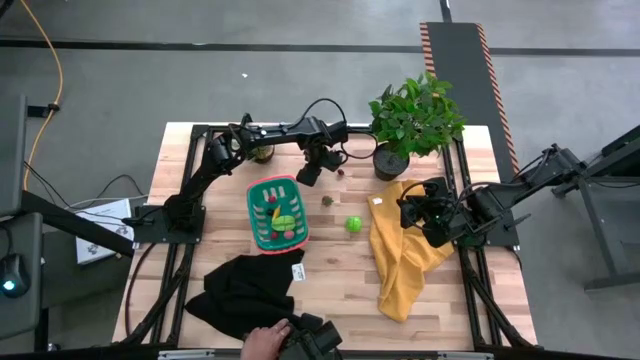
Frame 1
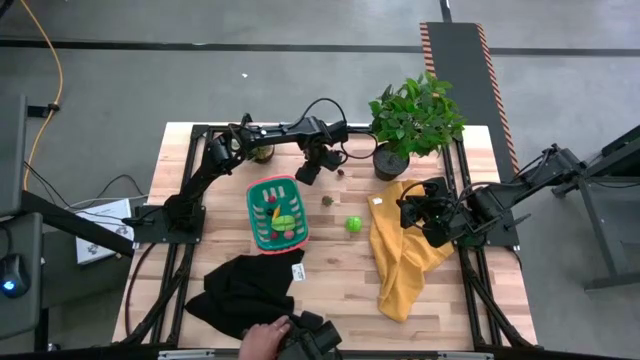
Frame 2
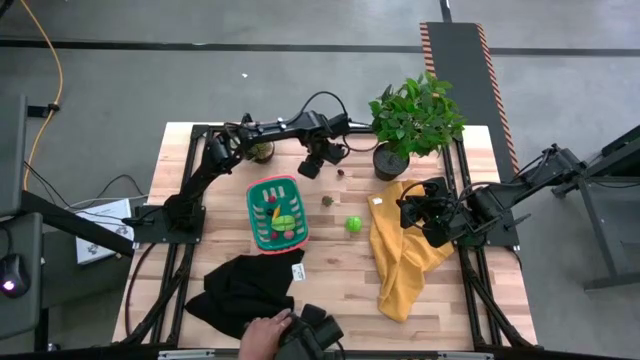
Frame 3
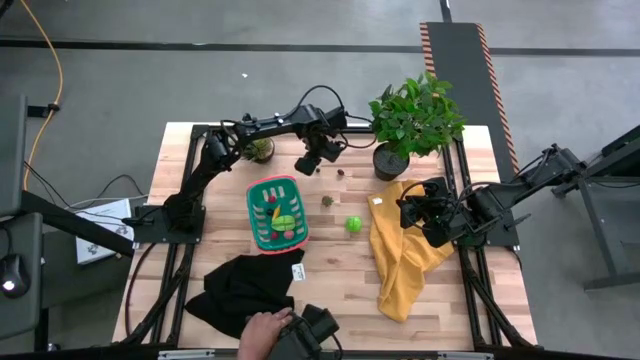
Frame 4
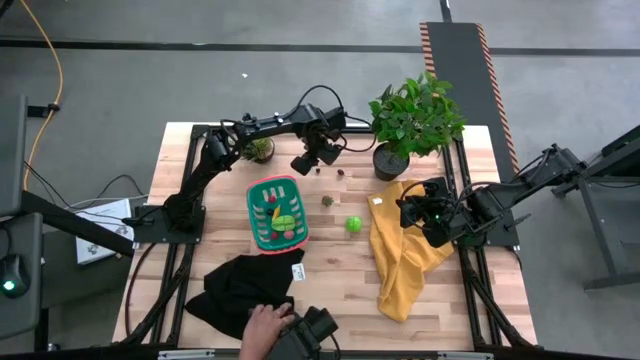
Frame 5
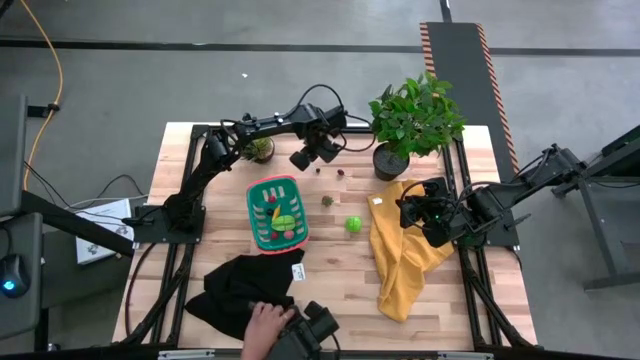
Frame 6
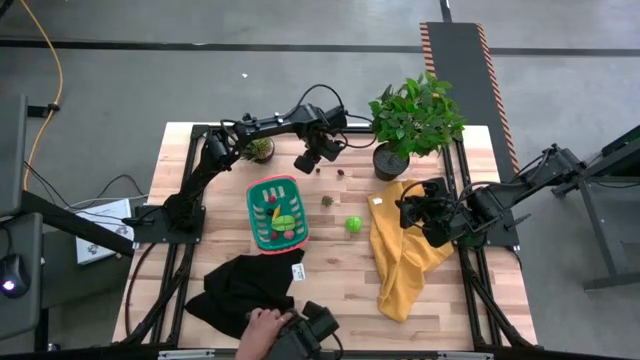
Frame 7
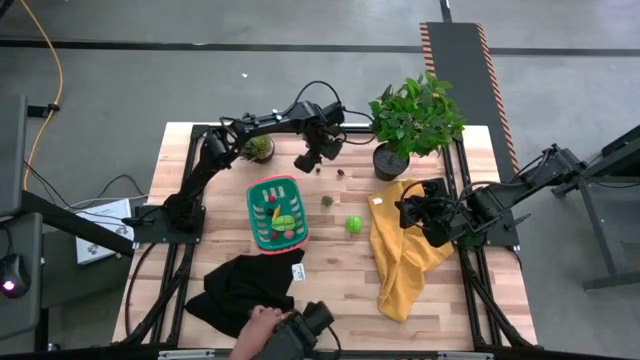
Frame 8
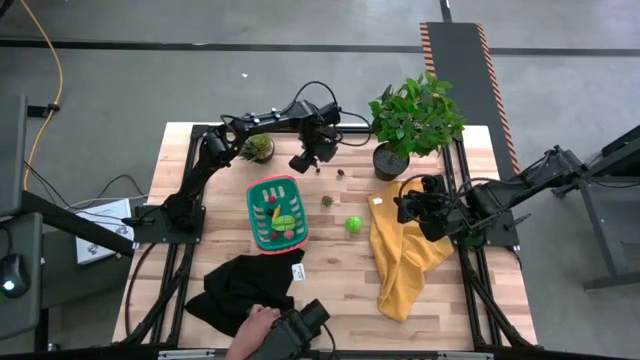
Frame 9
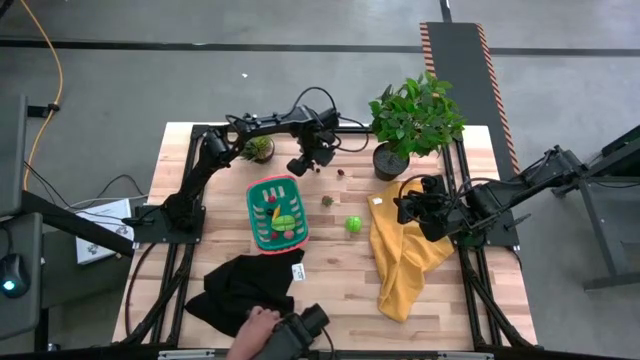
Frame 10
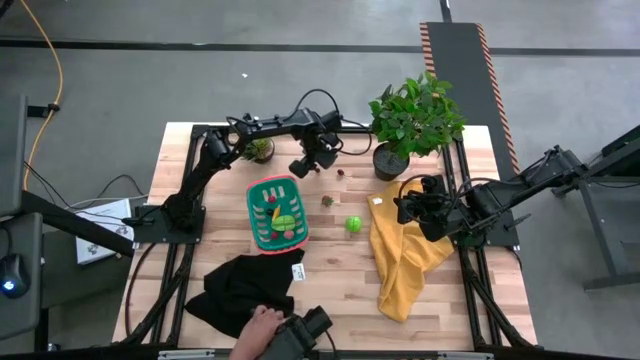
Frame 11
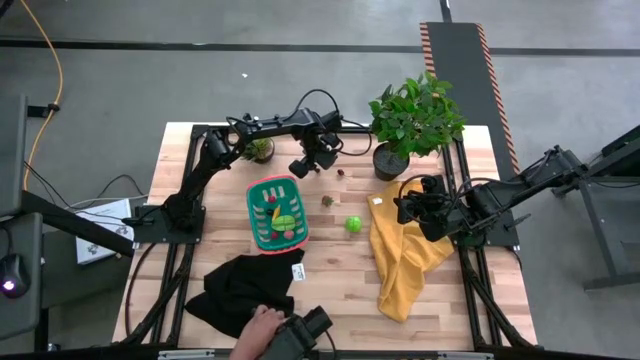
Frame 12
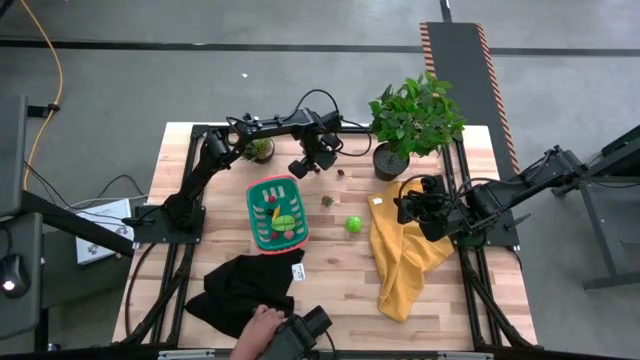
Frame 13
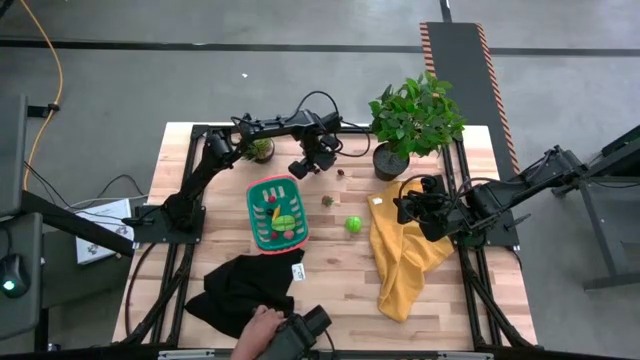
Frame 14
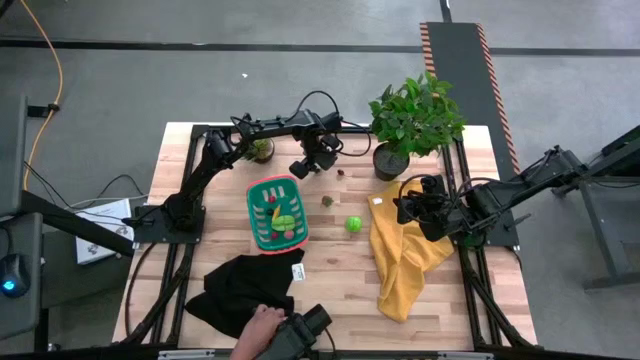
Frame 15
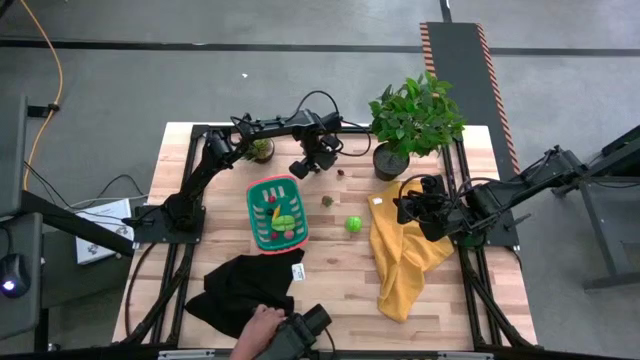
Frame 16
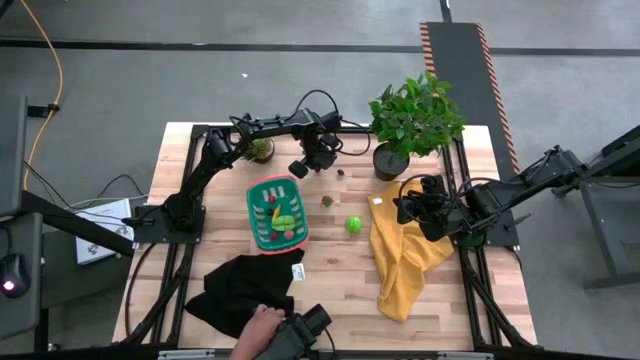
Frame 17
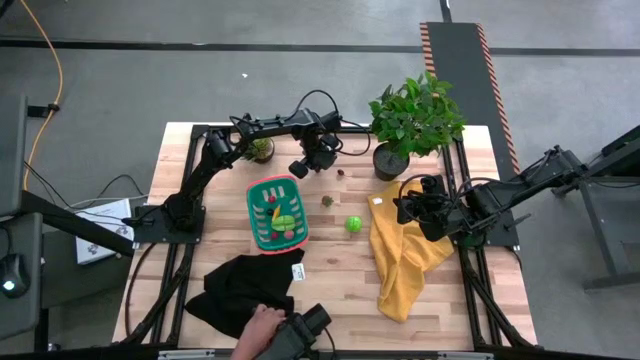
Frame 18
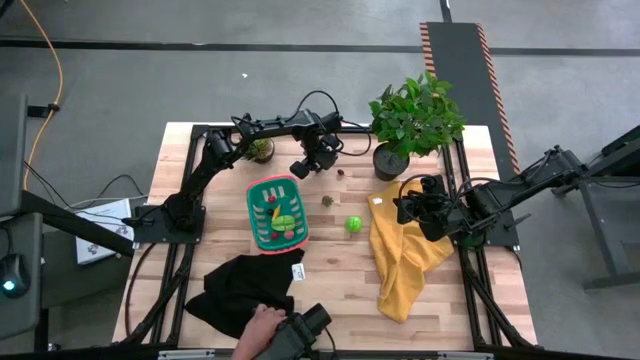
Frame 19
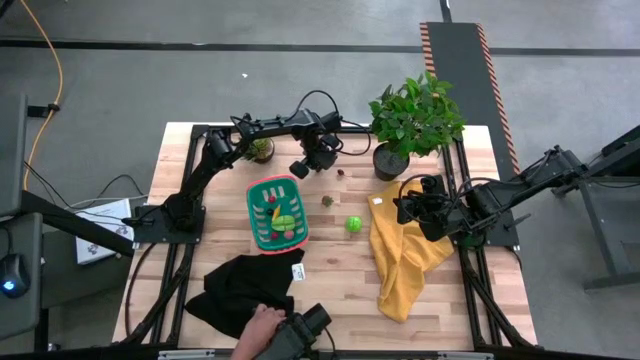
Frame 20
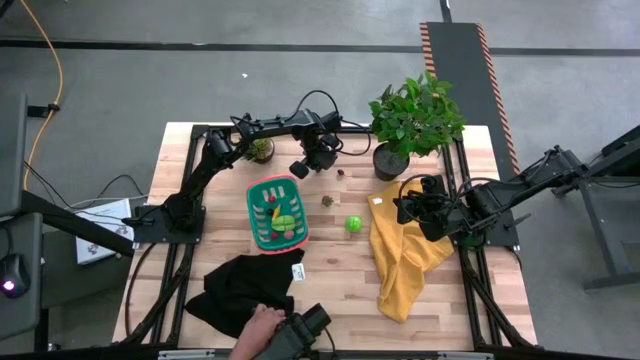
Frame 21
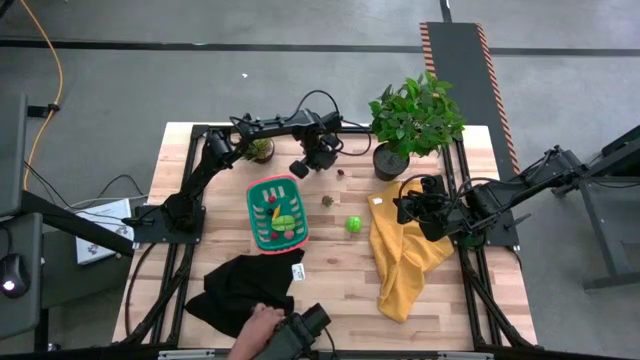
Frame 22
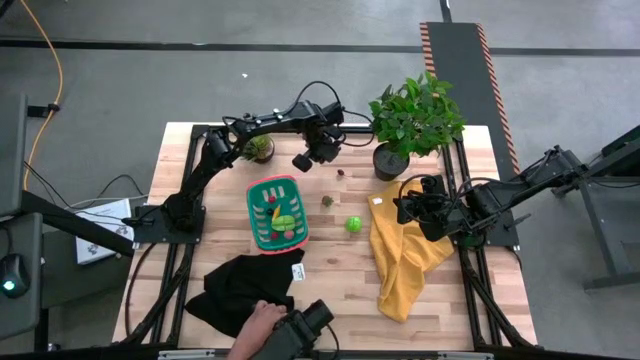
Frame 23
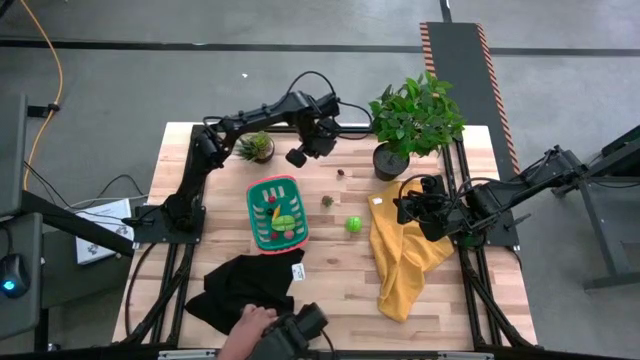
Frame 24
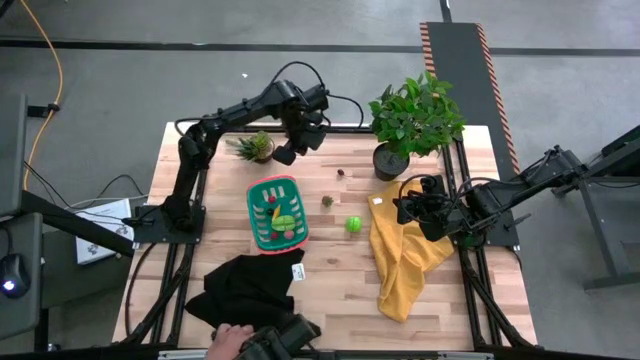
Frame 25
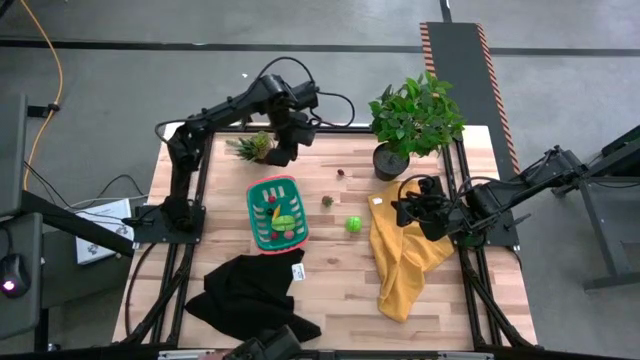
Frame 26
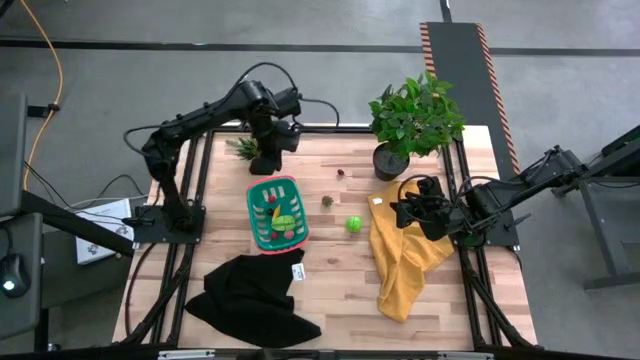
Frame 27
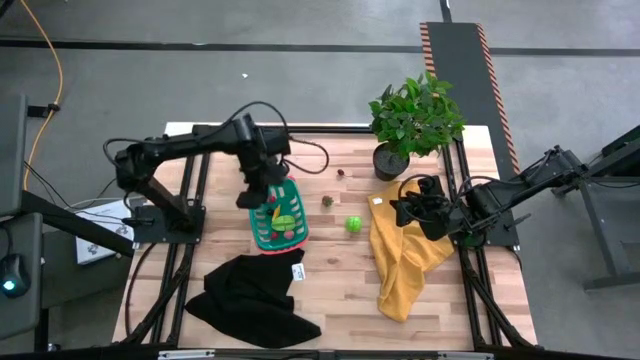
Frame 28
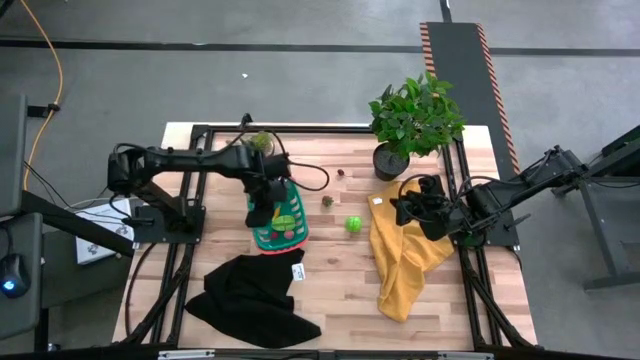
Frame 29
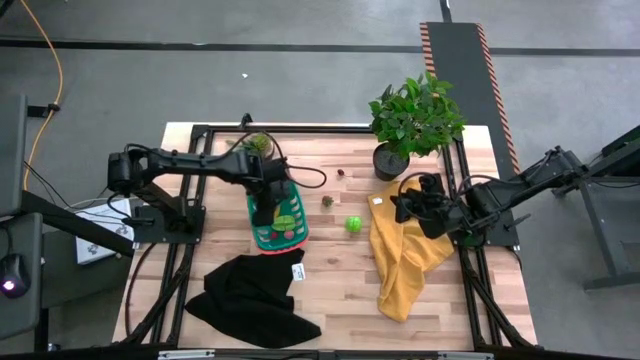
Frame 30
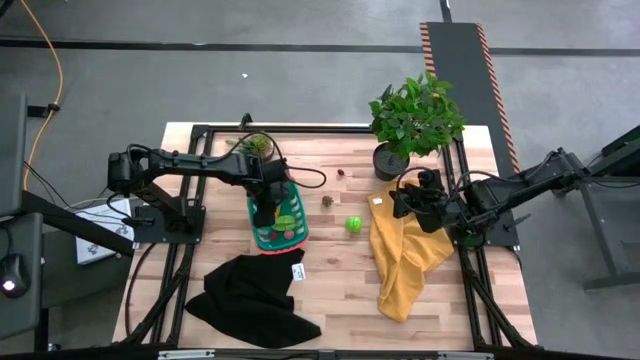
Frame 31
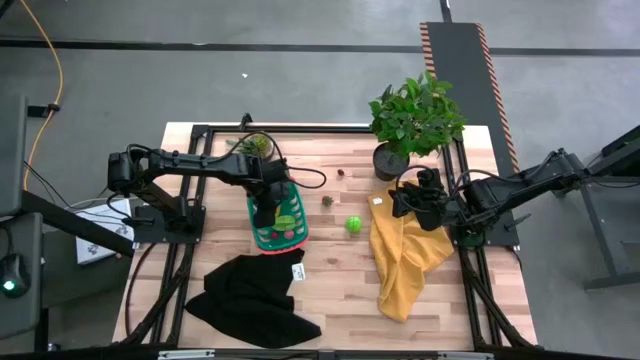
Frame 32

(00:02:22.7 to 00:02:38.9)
Task: Pick and placing Produce into tupperware
Put the blueberry in the green basket

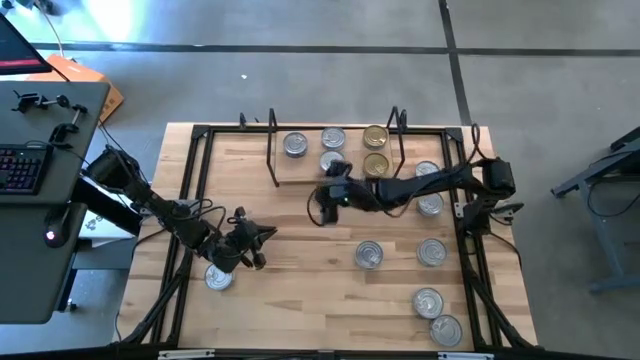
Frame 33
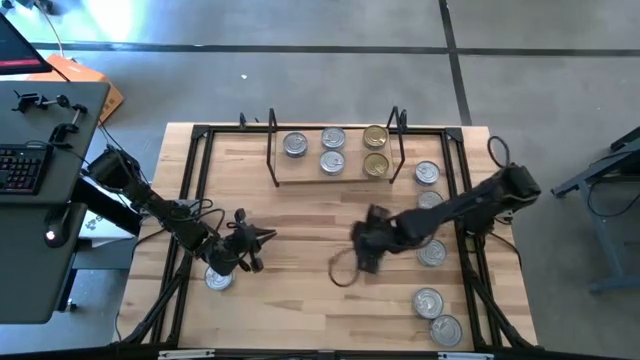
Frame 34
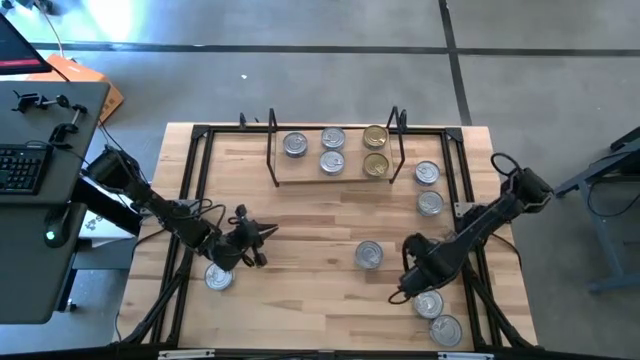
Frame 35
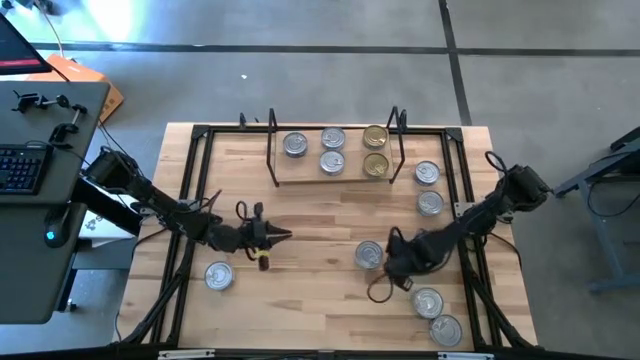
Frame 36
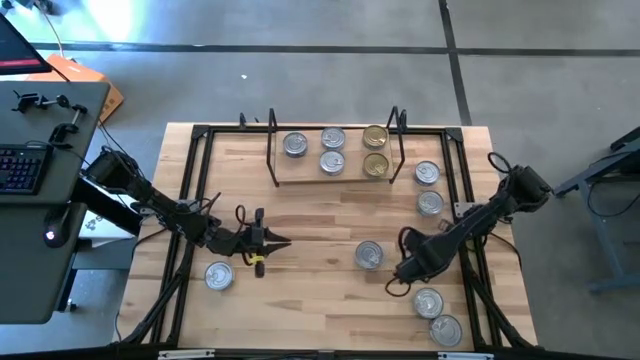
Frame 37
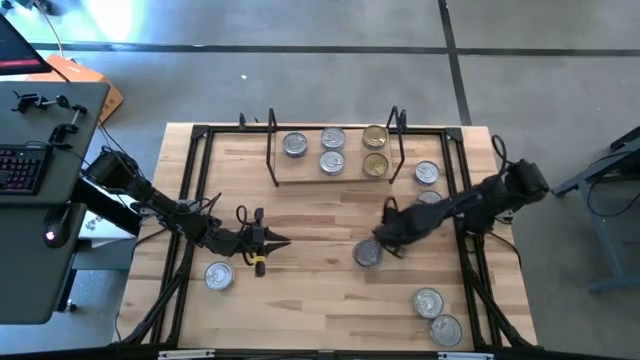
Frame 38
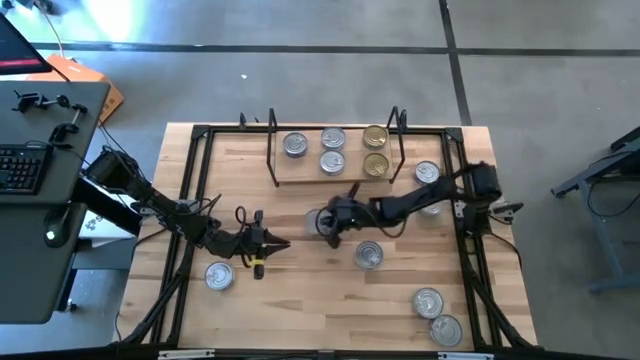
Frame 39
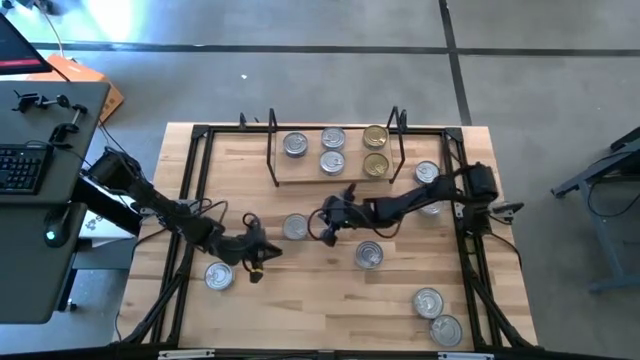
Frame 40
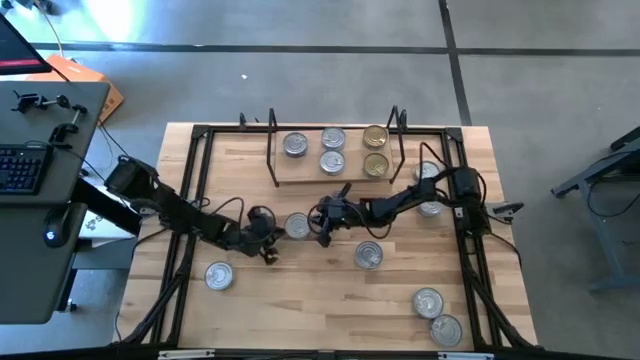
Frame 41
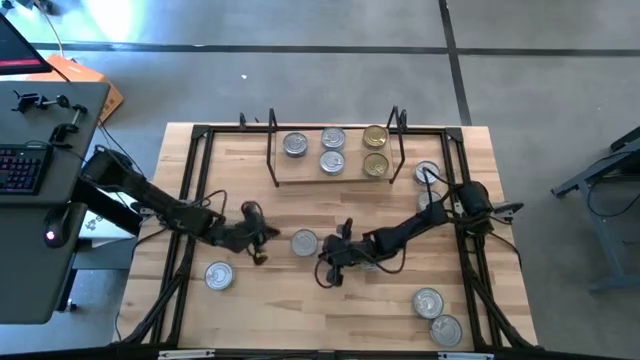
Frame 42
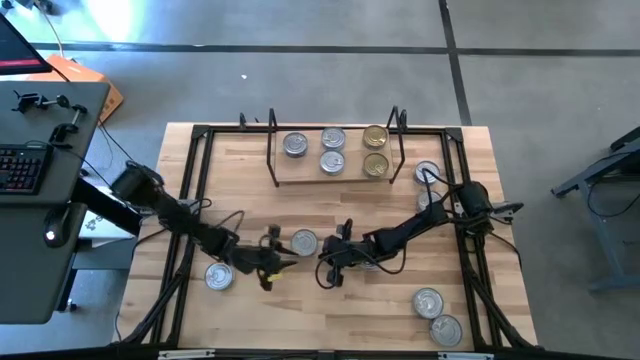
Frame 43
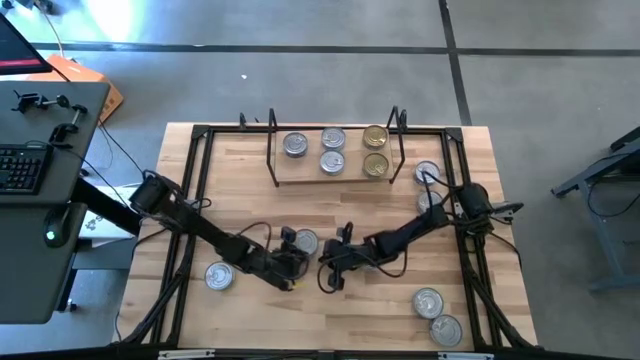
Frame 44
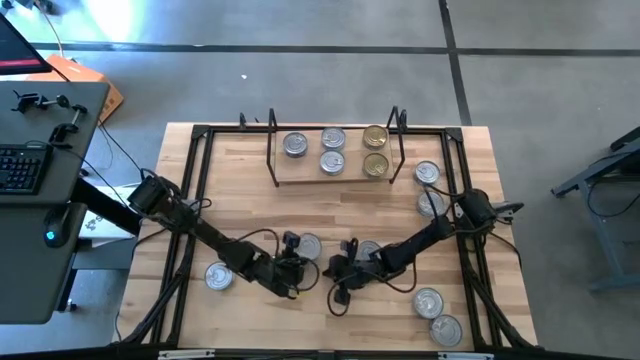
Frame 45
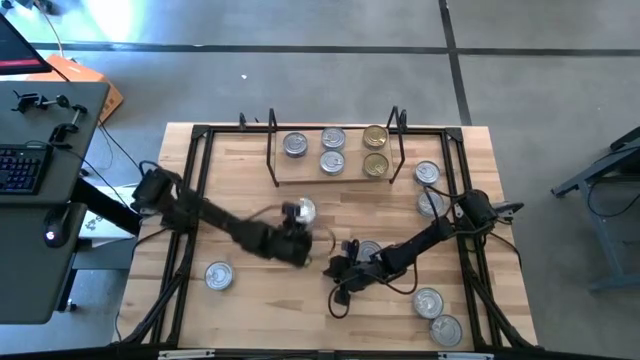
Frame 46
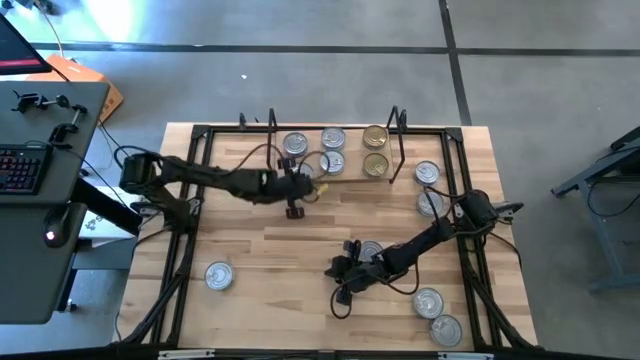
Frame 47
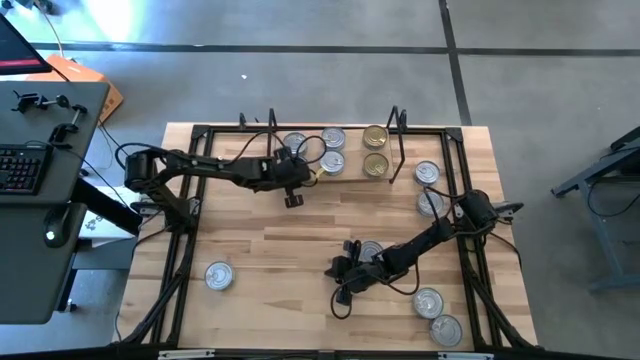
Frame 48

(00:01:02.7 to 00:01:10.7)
Task: Stack canned seafood by type on shelf
Put the blue tuna can on the shelf and align it with the other blue tuna can
